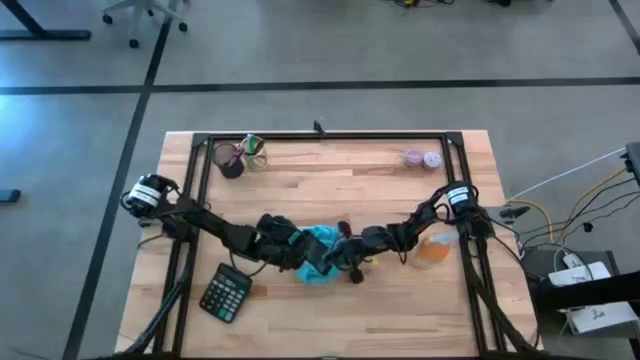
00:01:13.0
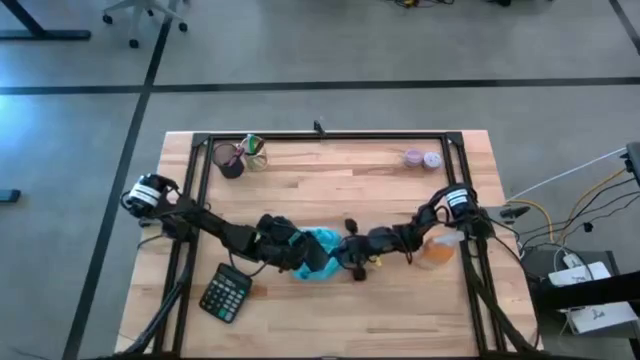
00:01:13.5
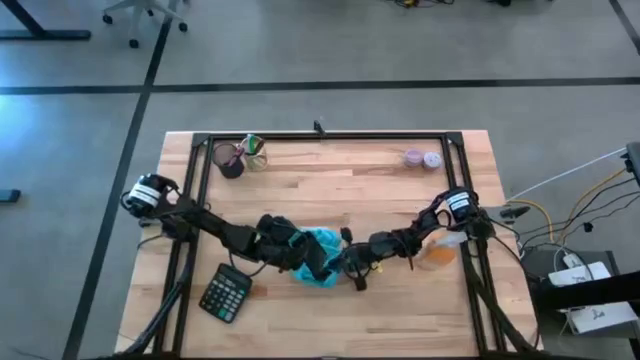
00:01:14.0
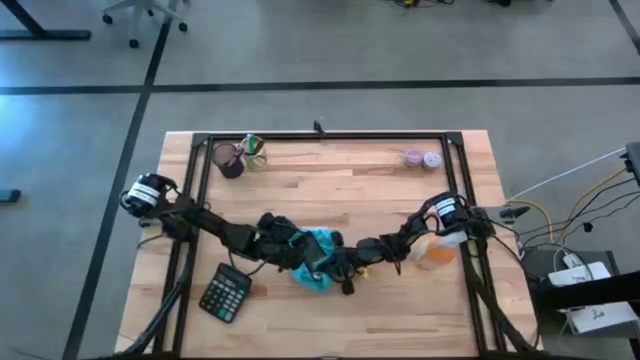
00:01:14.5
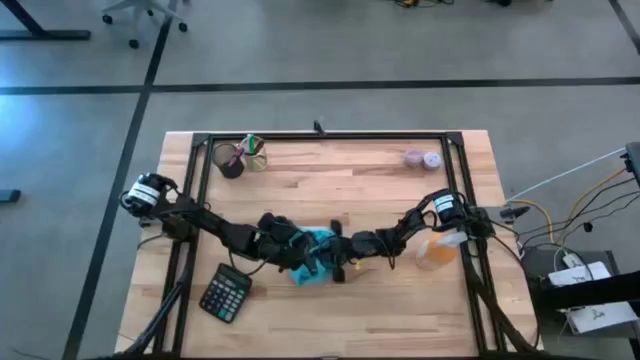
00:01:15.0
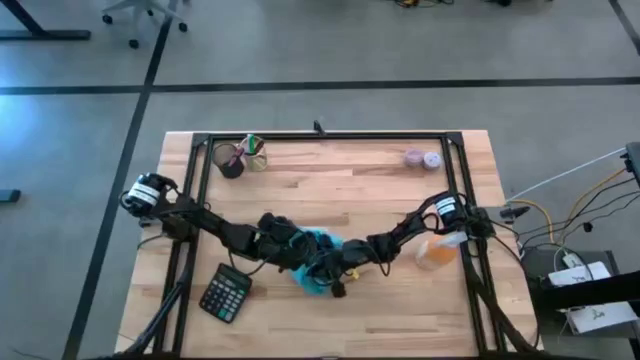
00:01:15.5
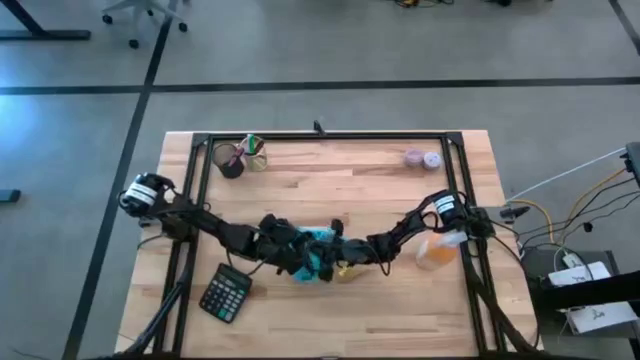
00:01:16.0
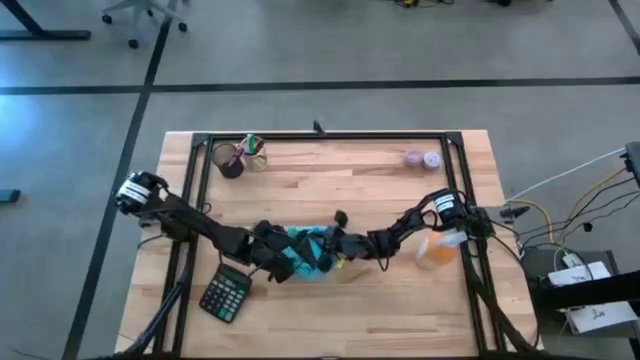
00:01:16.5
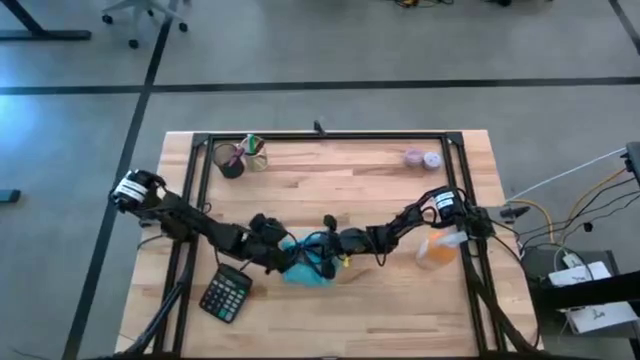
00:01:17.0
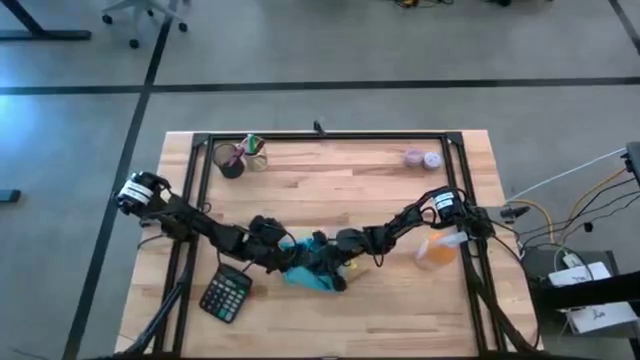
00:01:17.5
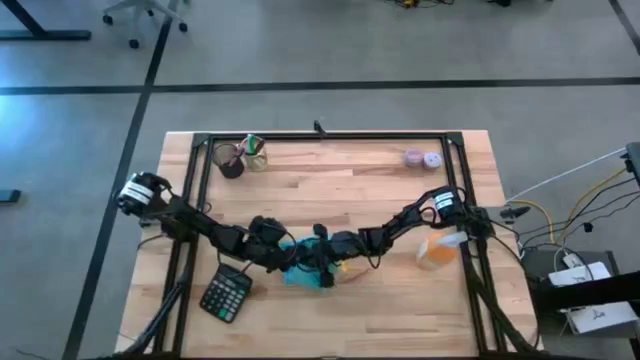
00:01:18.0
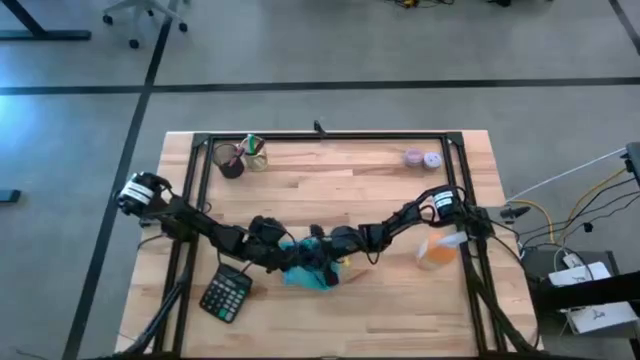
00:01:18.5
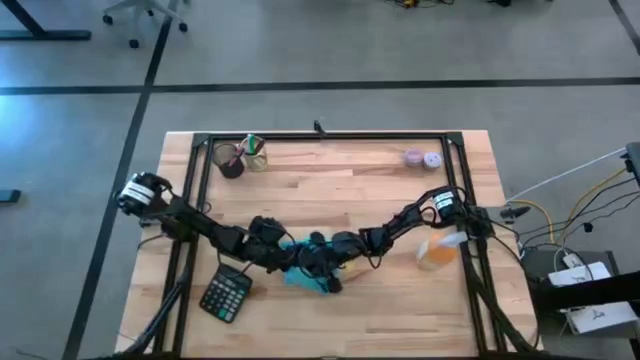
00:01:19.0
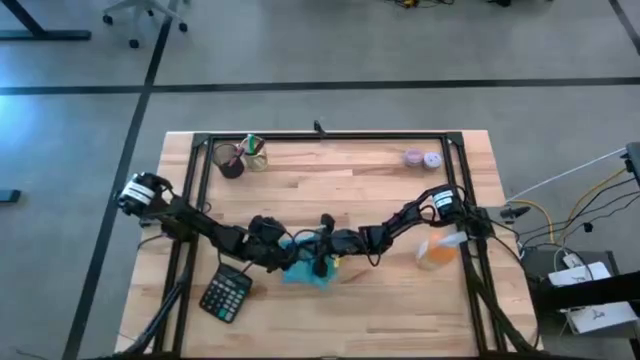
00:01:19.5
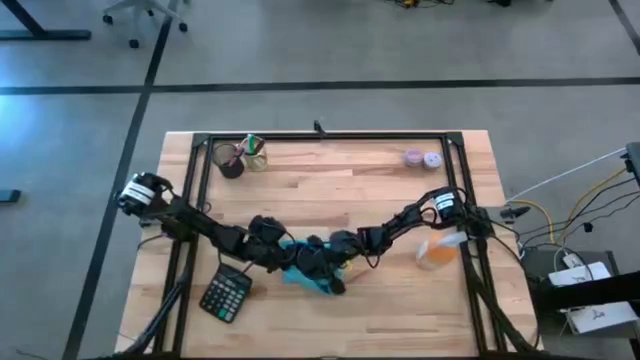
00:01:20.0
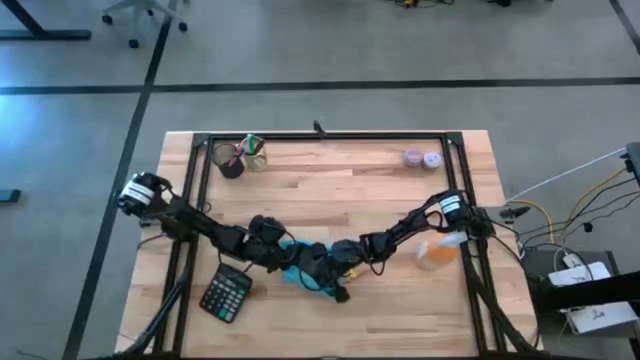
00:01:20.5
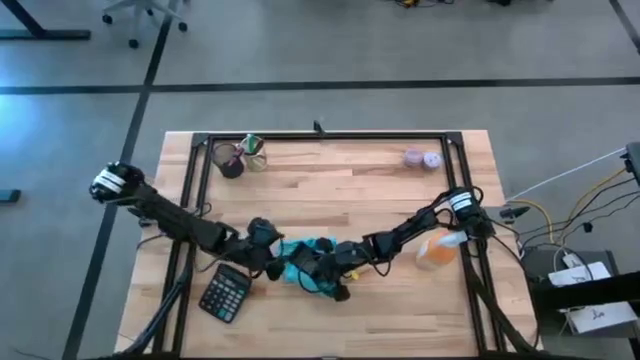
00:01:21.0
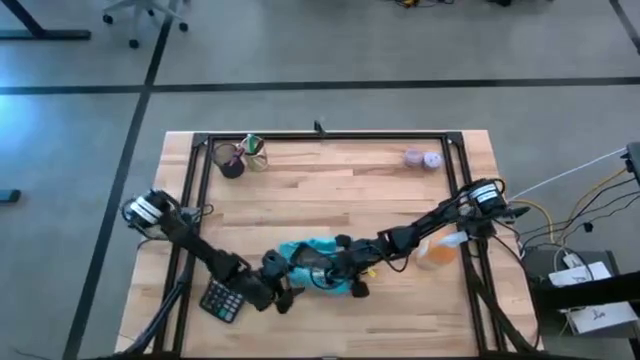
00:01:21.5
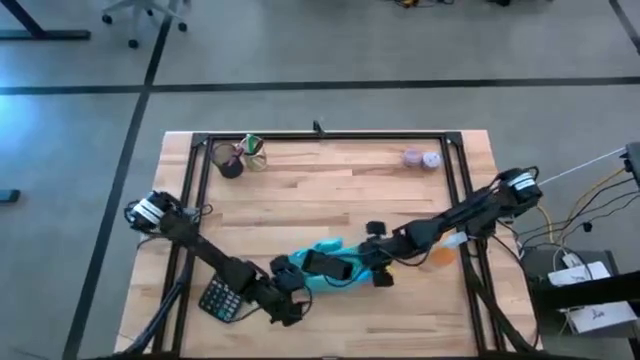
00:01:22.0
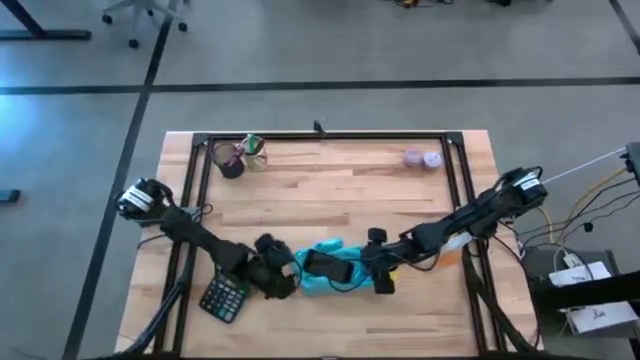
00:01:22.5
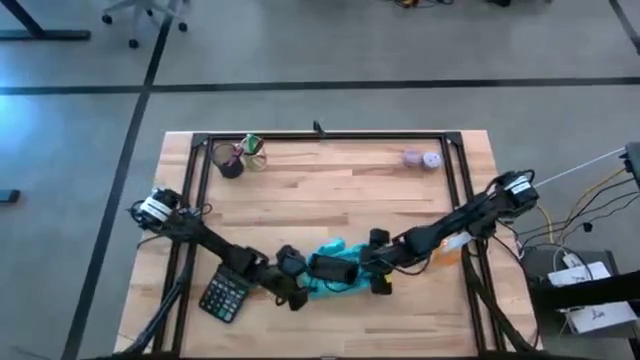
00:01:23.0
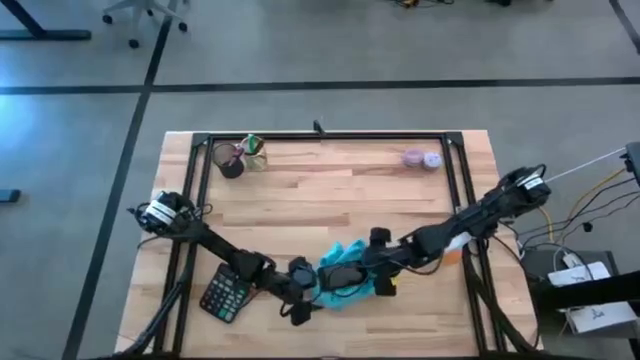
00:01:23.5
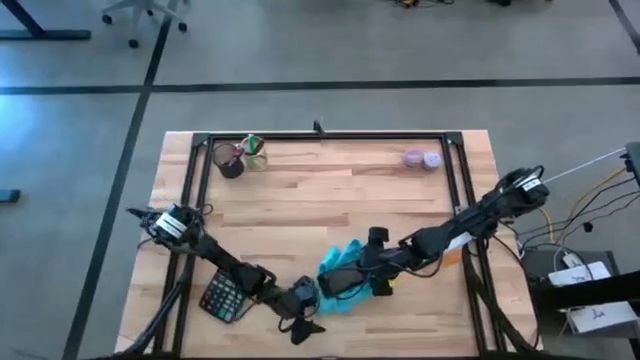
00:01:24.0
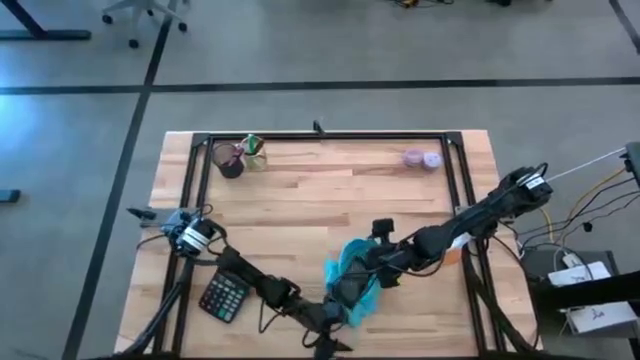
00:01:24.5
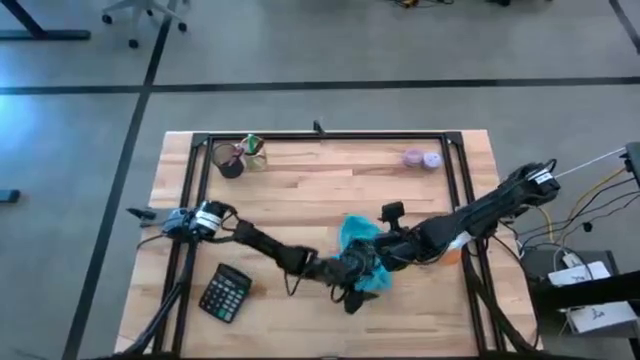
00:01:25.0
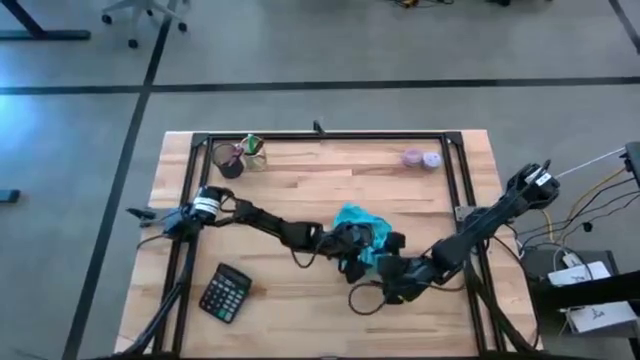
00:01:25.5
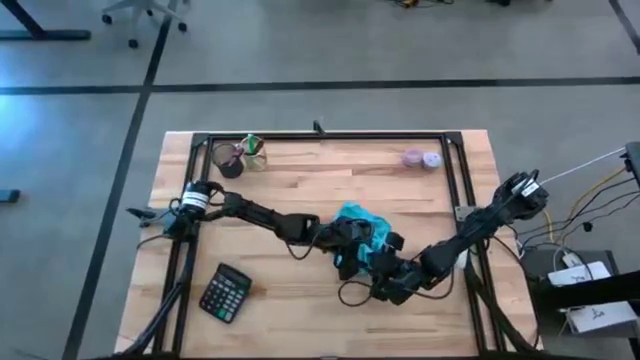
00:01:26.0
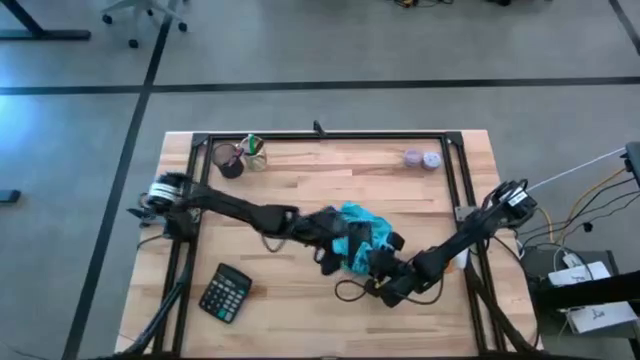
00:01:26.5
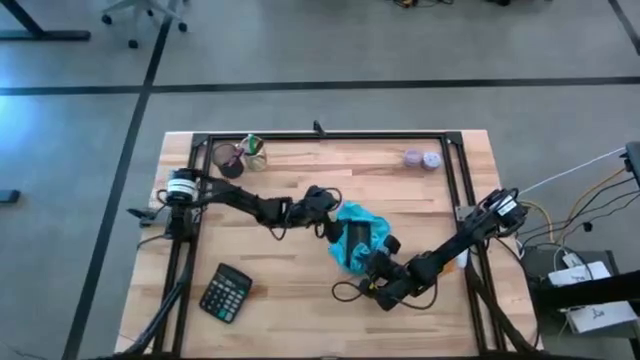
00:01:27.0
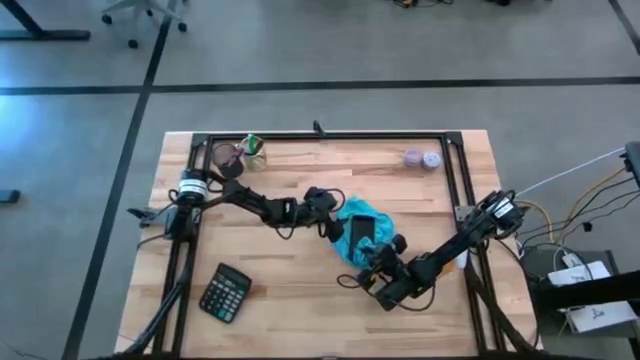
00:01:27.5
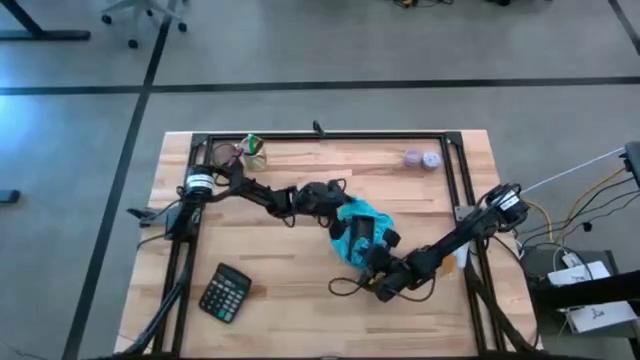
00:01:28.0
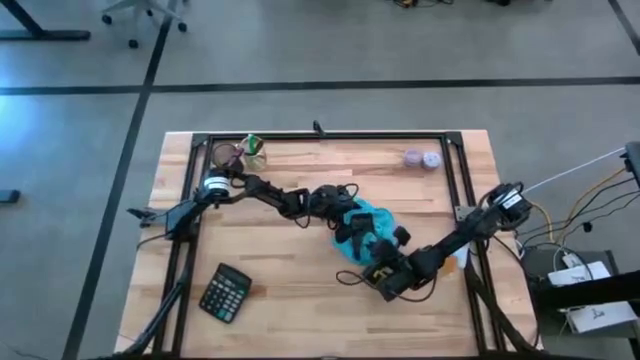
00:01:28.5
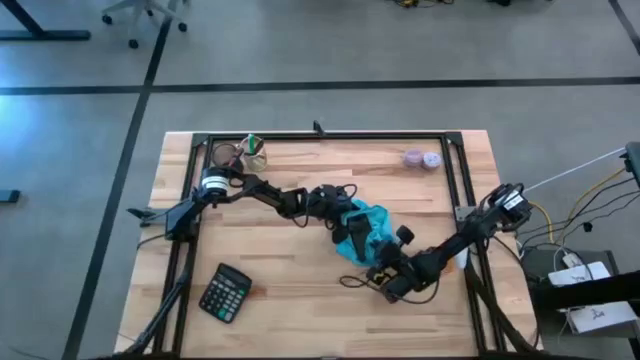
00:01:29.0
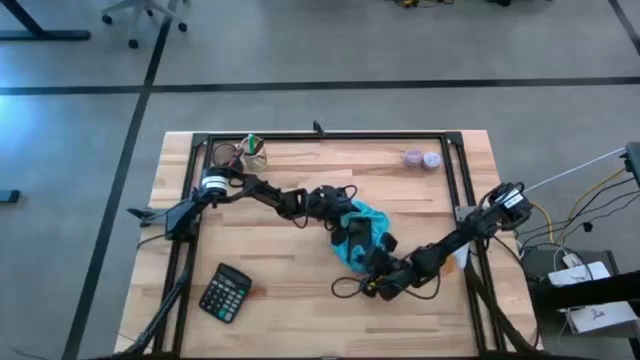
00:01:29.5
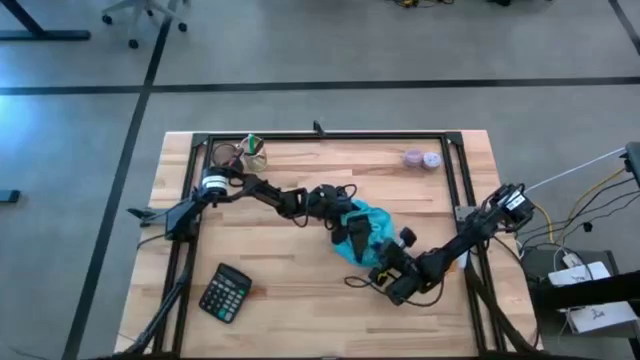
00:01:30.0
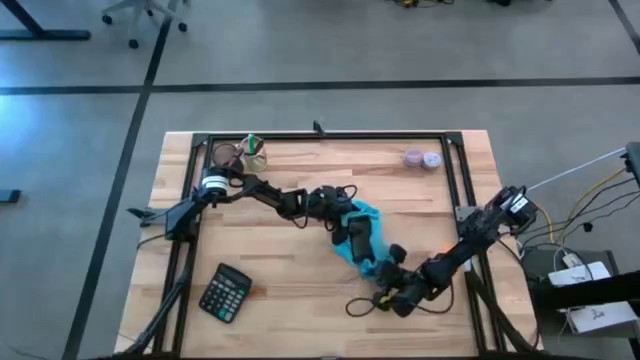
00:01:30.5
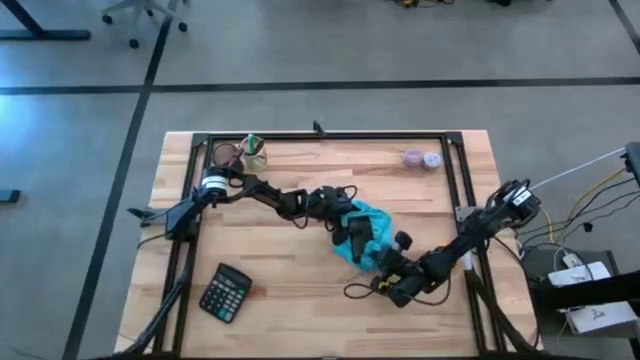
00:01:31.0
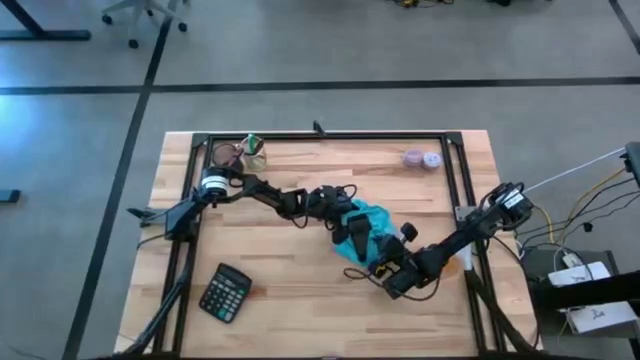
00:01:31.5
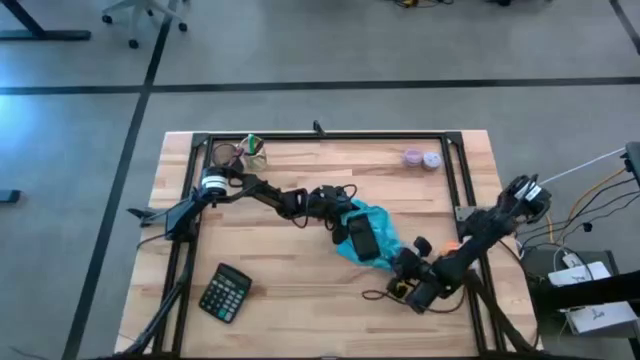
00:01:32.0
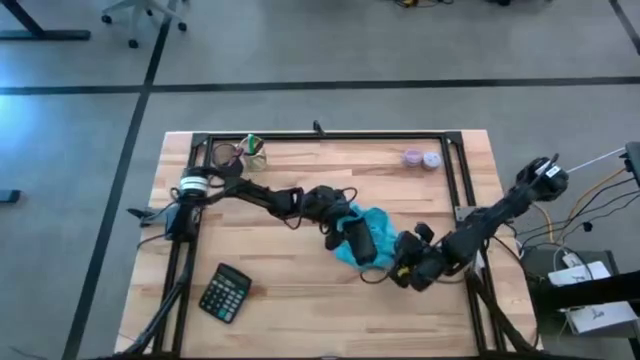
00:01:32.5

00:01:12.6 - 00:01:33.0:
Task: Apply microfiber cloth
Wipe the front of the cellphone with the blue microfiber cloth

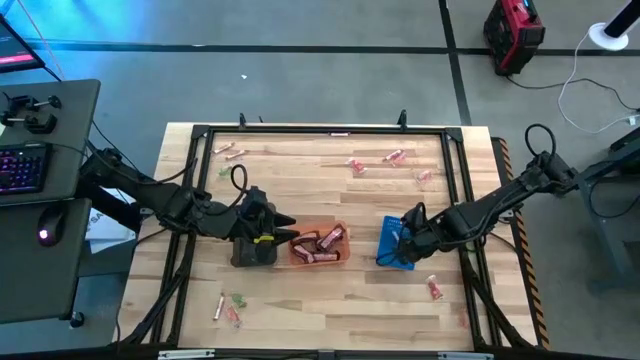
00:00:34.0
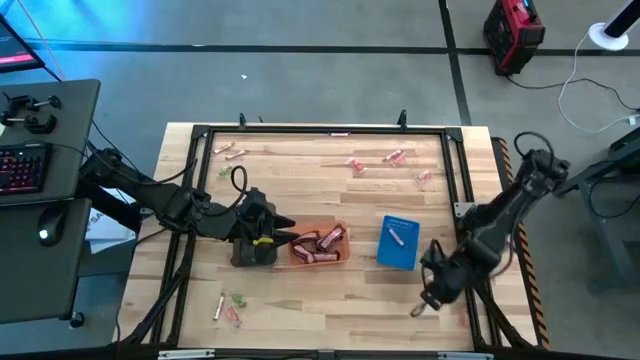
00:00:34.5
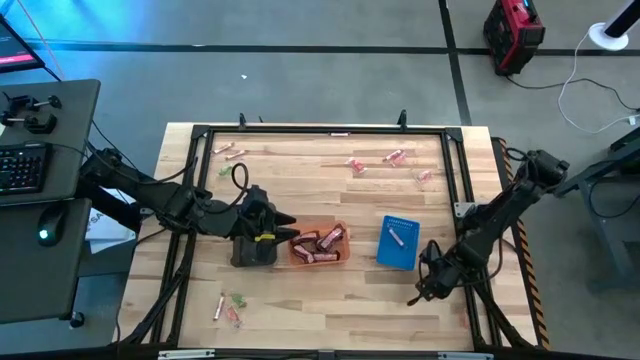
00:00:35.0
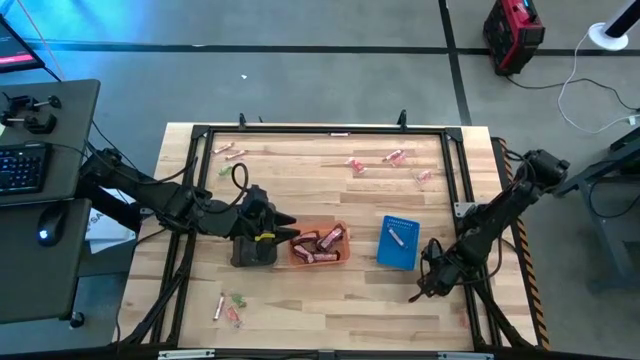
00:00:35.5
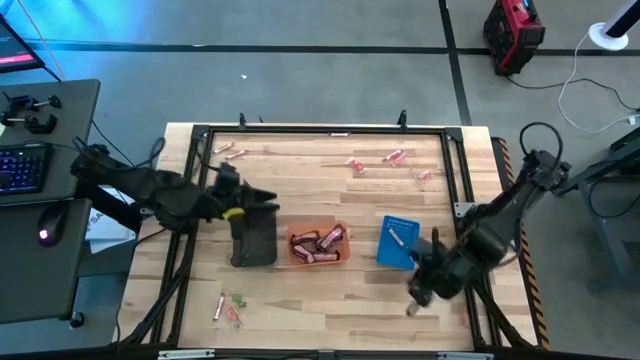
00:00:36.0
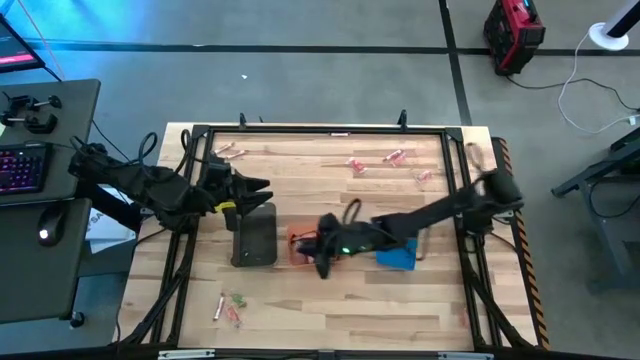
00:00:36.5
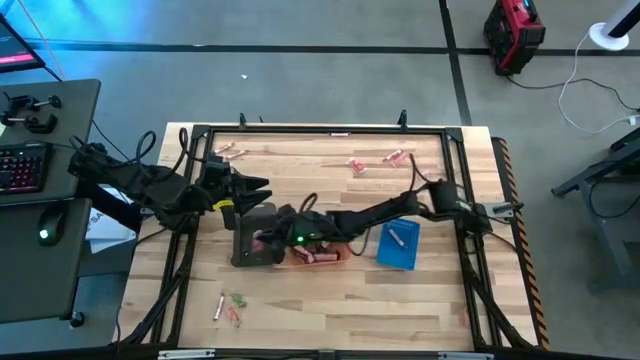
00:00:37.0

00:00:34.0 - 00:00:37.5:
Task: Sort candy by brand, put in halloween buckets
Put the red gummy into the black bin
